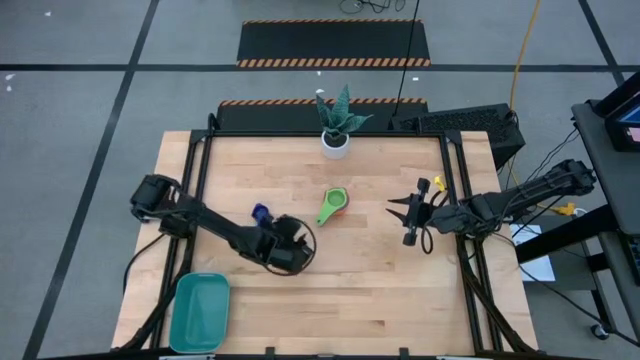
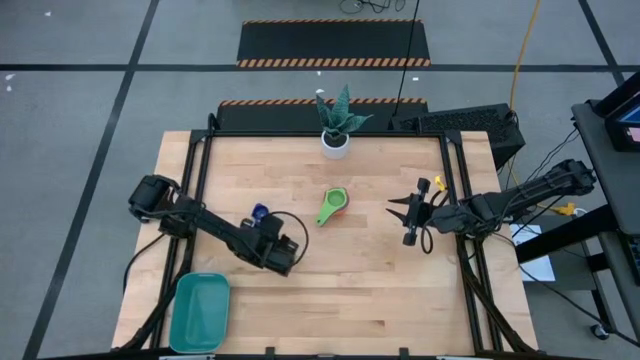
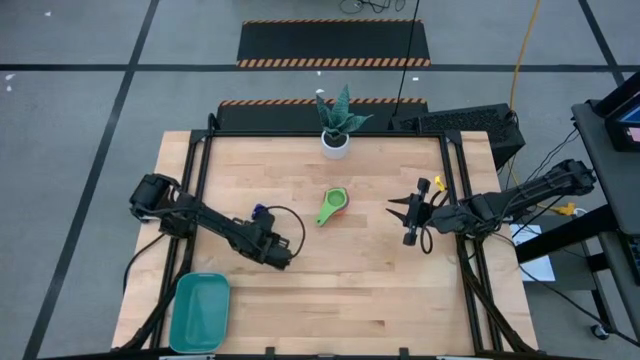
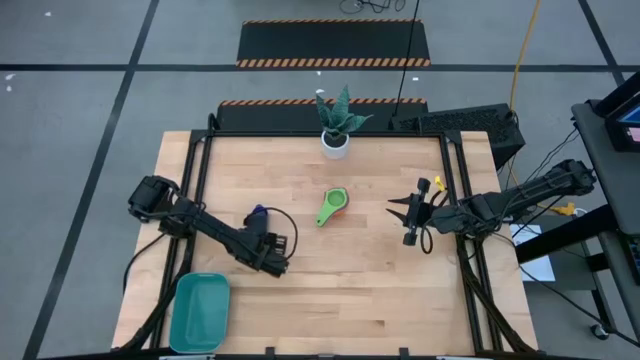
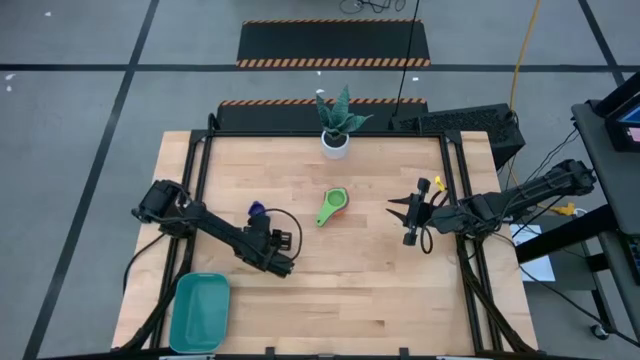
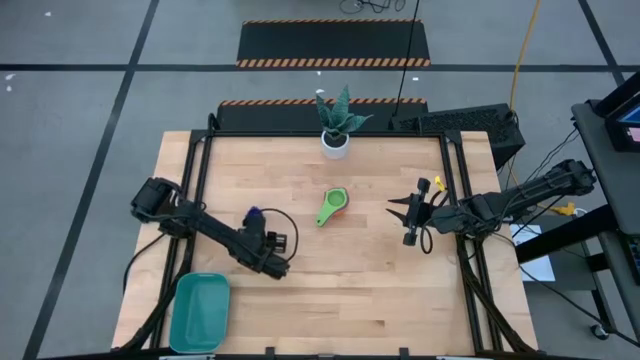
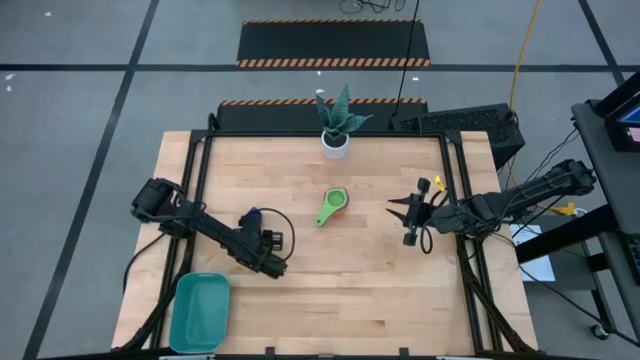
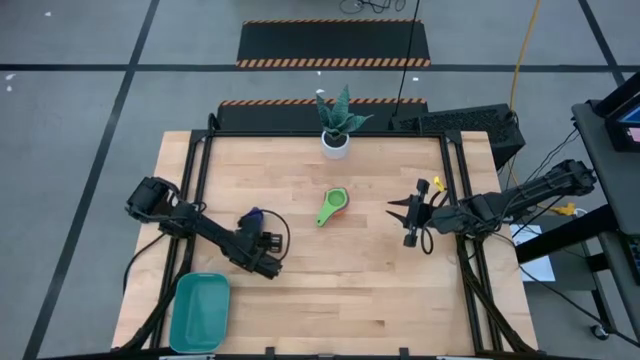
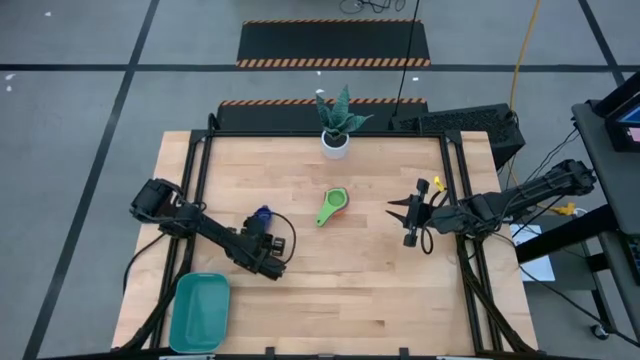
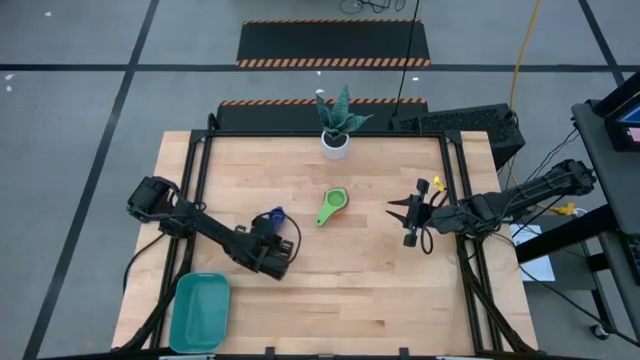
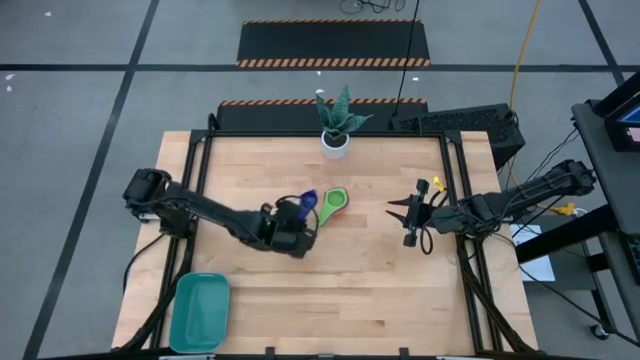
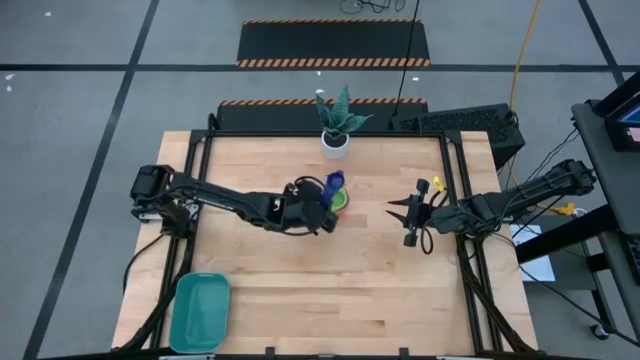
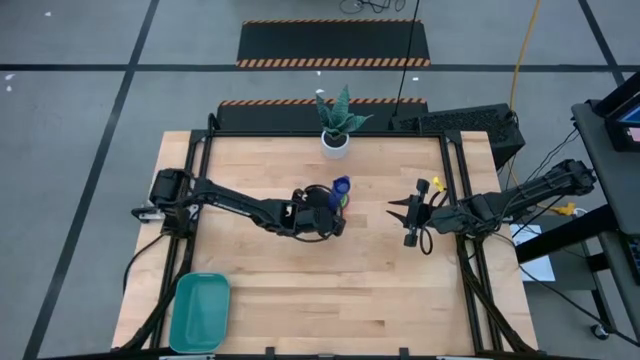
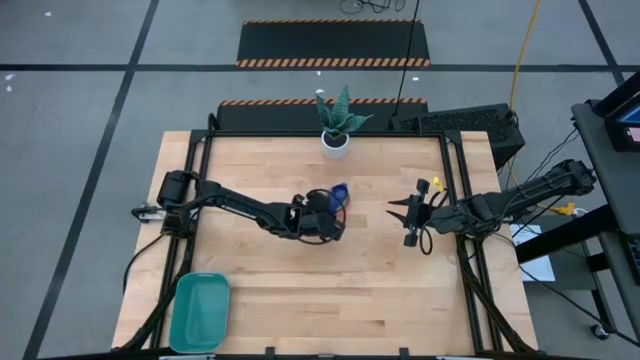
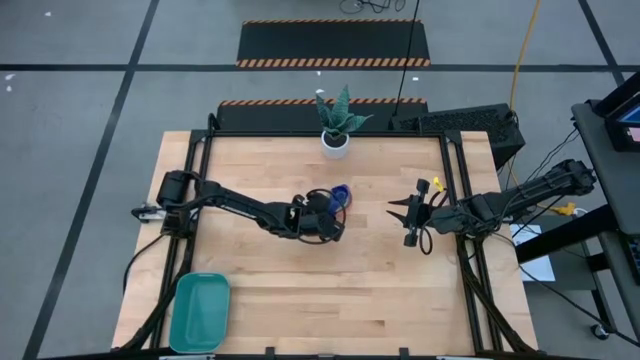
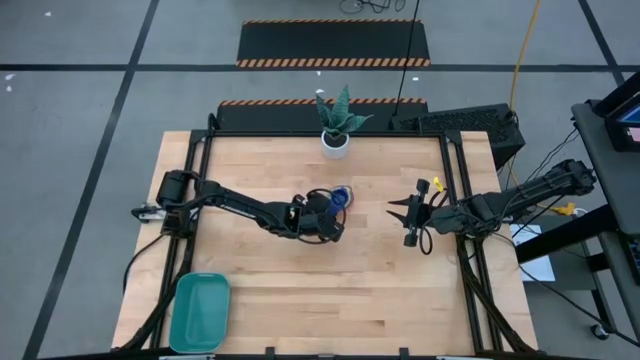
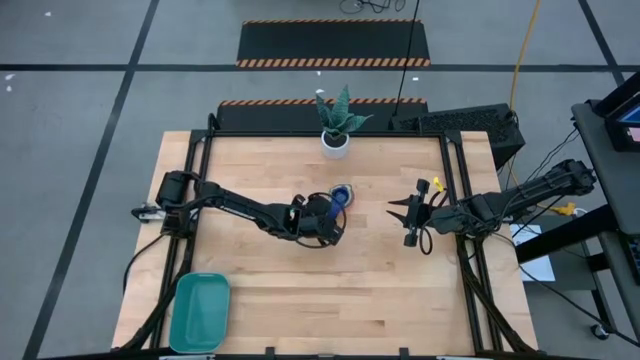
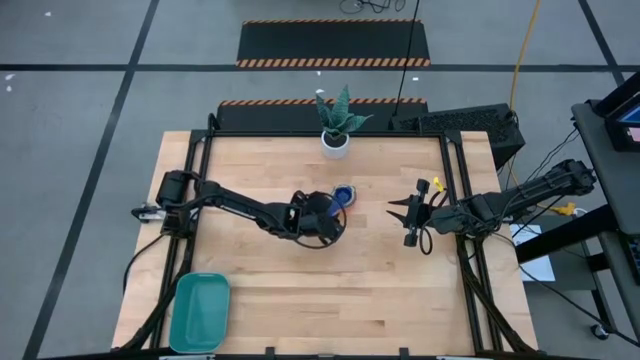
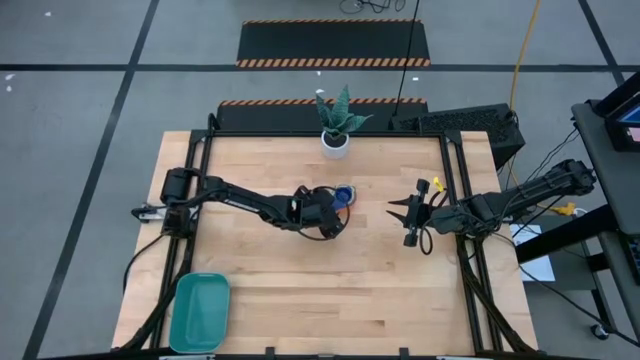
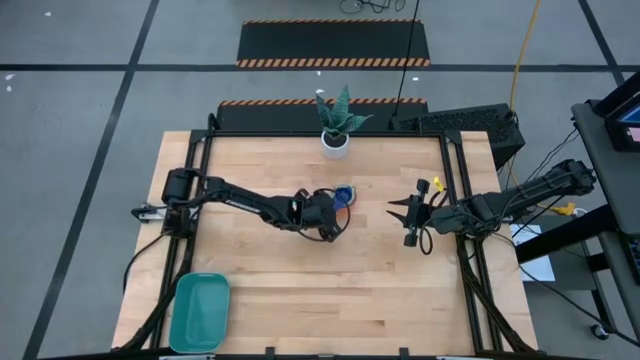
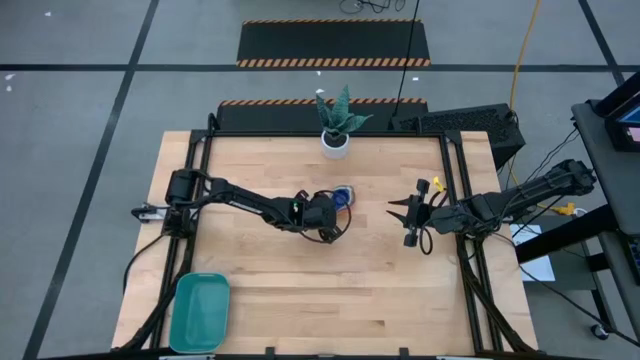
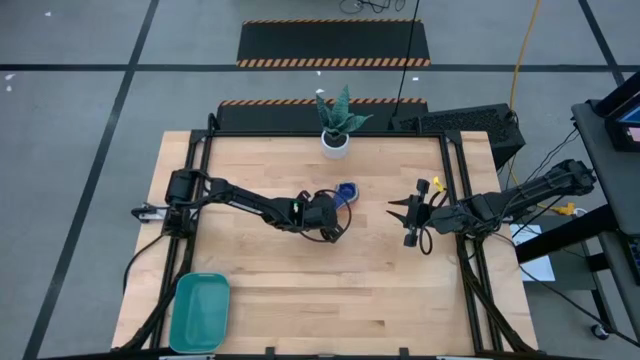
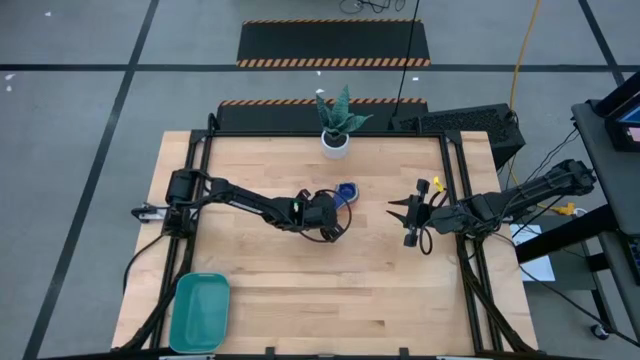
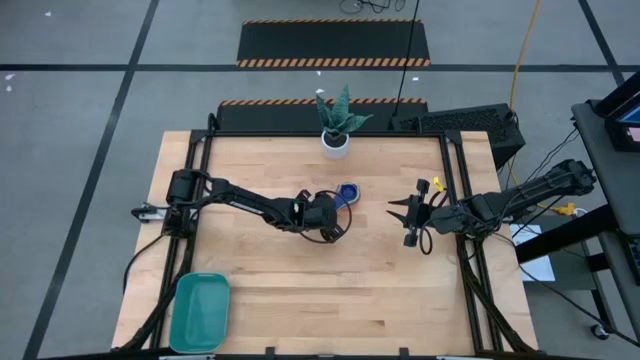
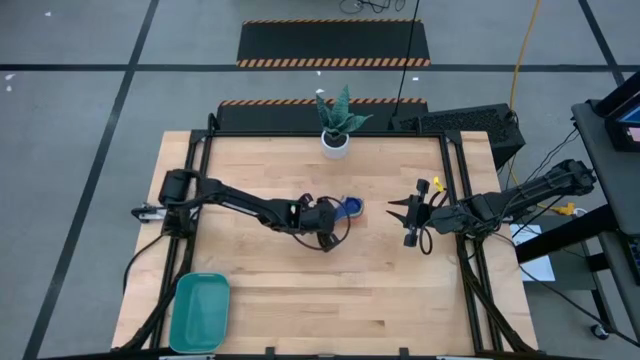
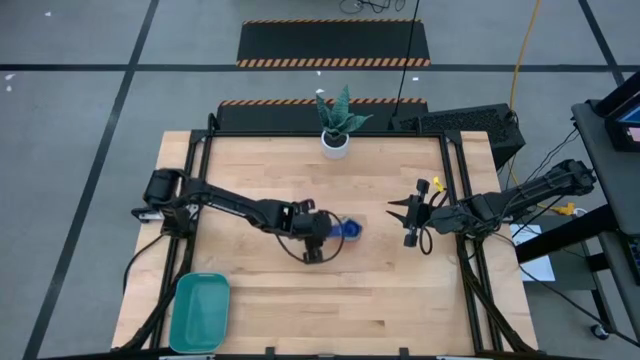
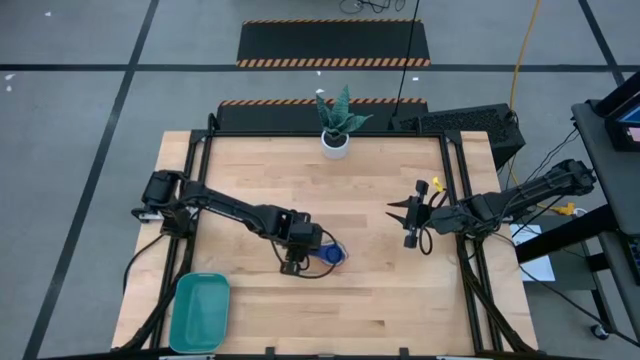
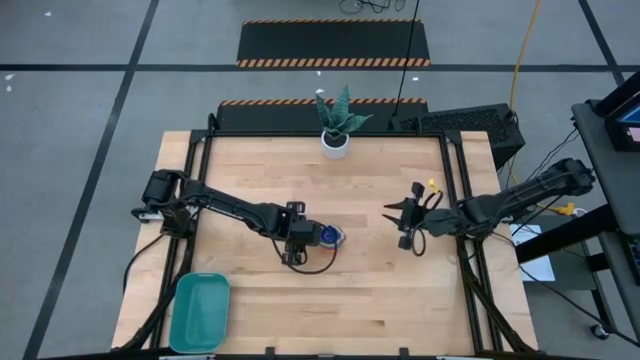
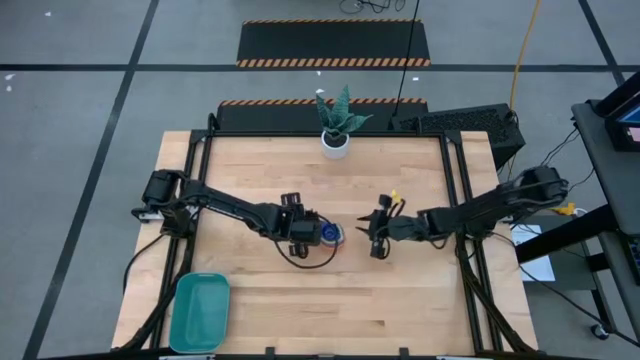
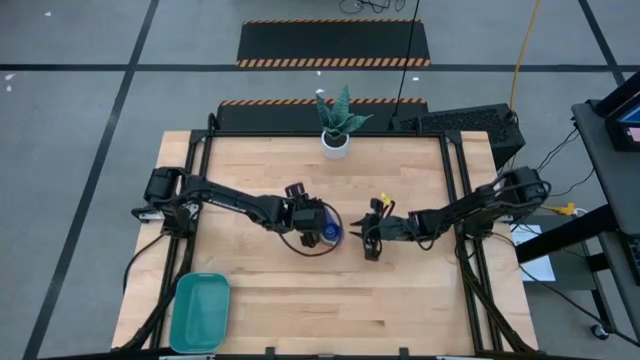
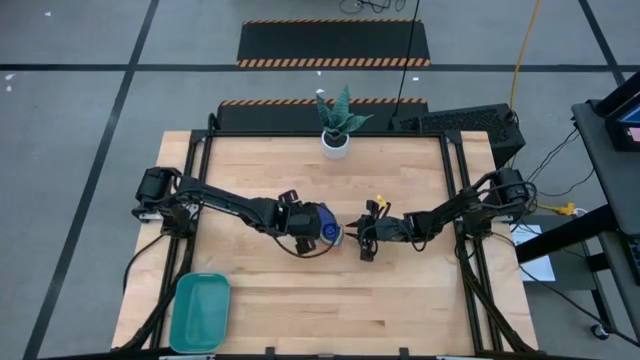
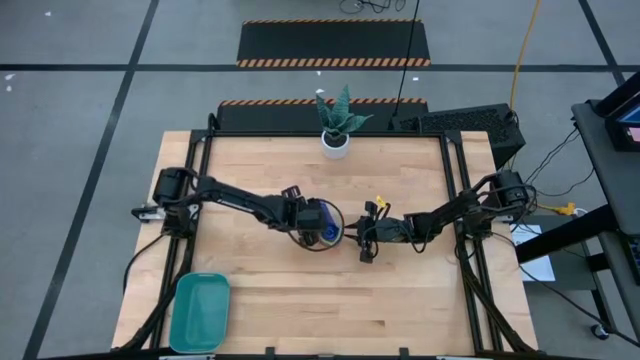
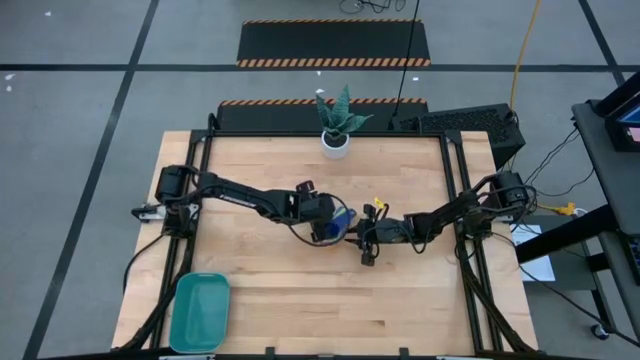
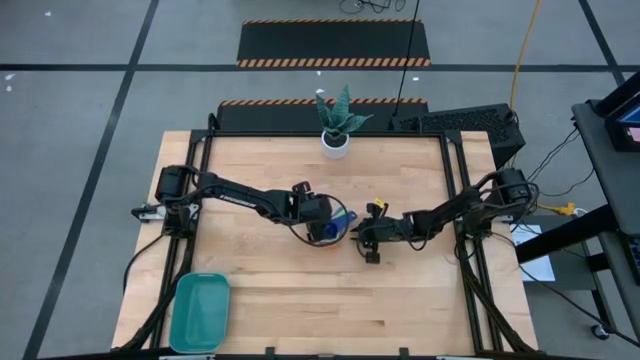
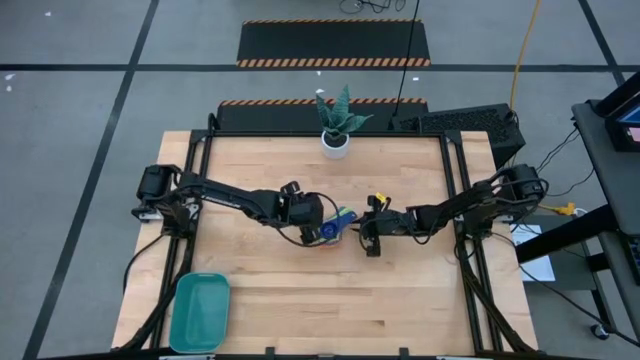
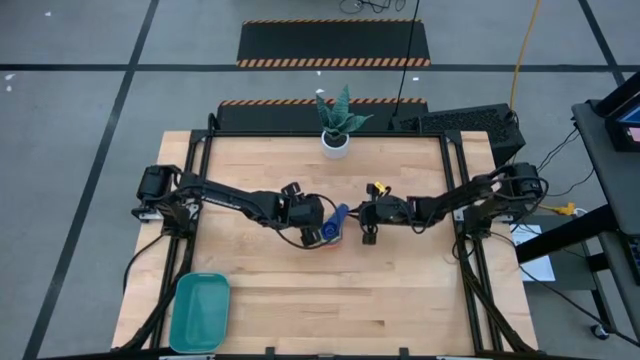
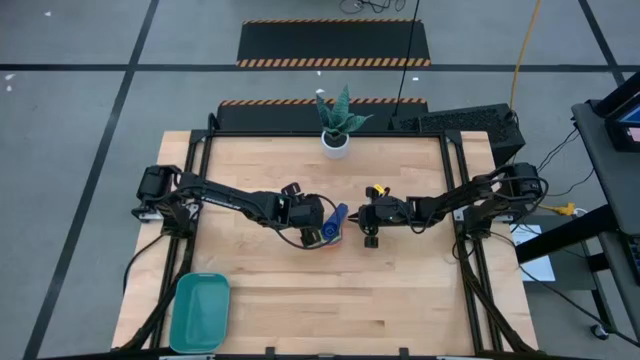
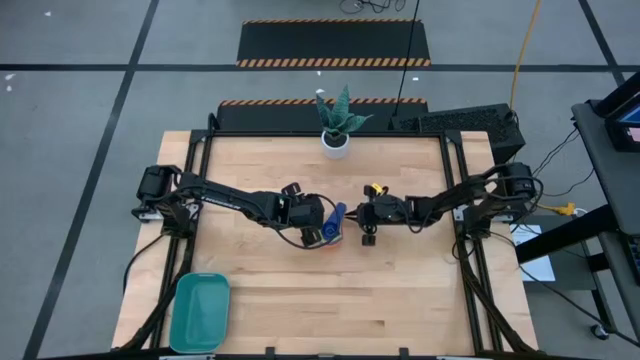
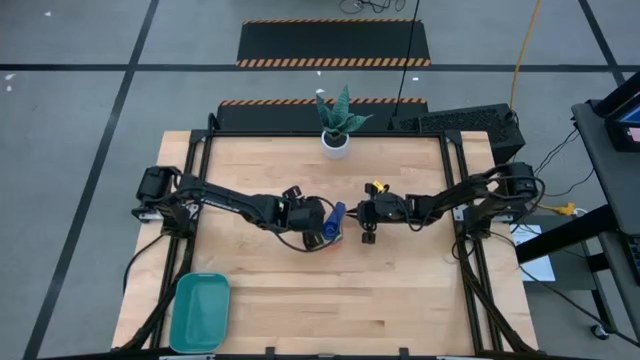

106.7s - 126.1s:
Task: Nest measuring cups in basket
Stack the violet measuring cup on the green measuring cup

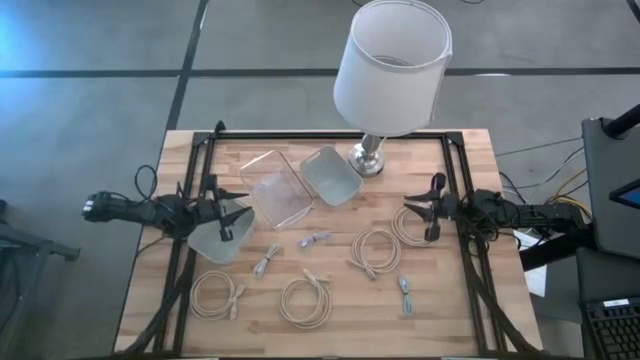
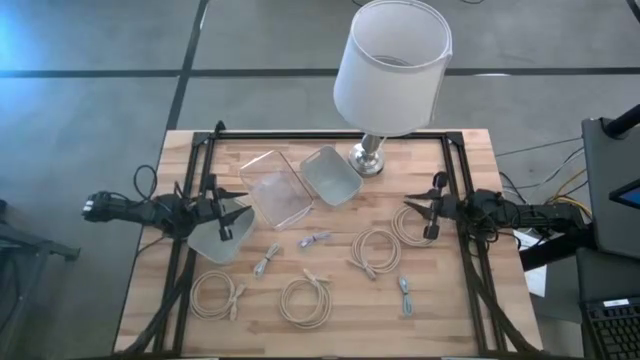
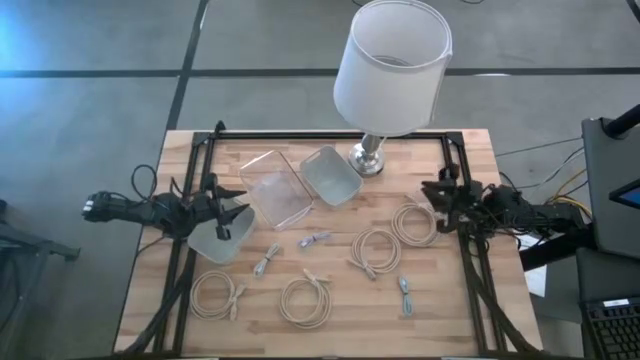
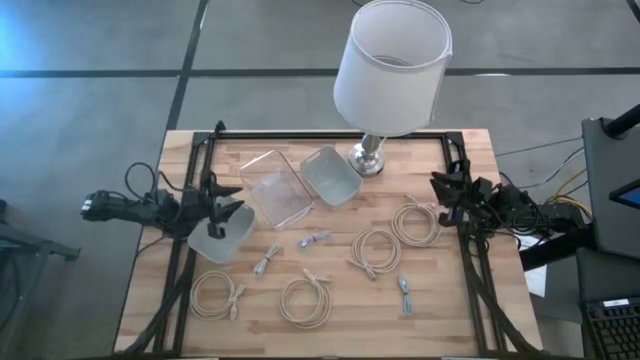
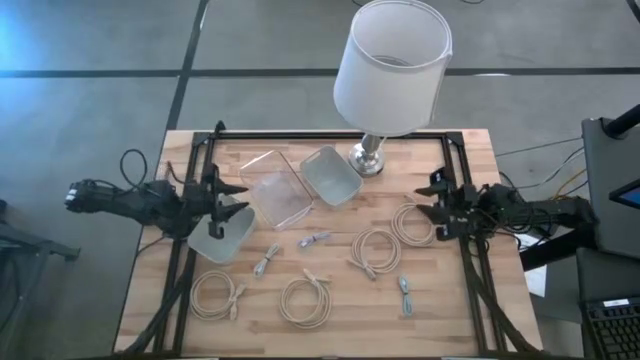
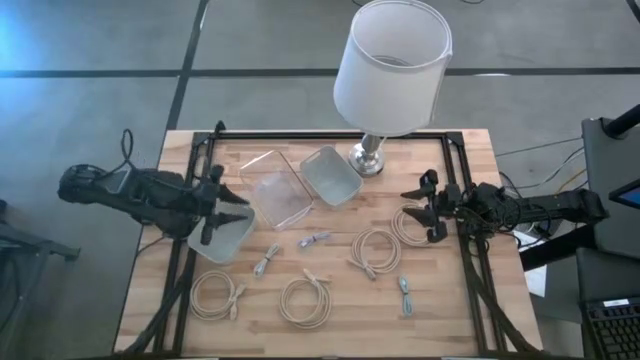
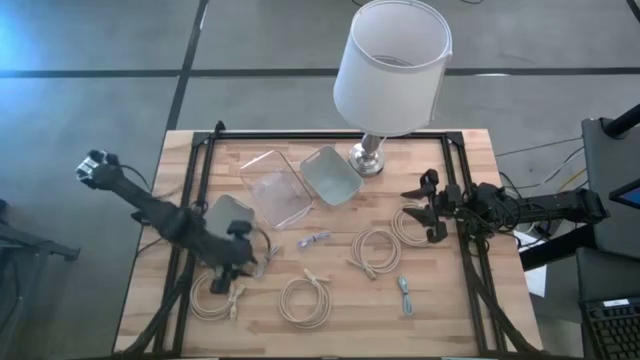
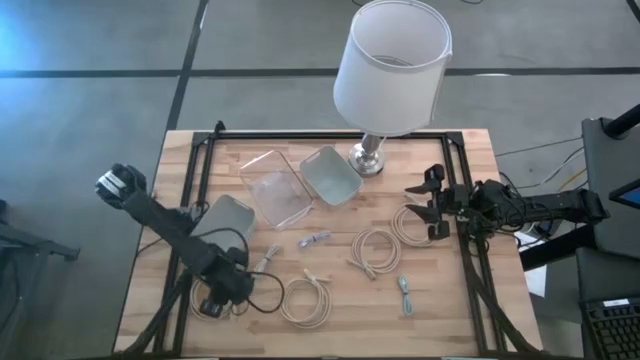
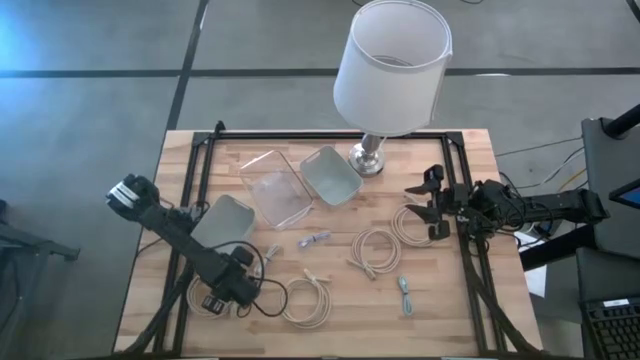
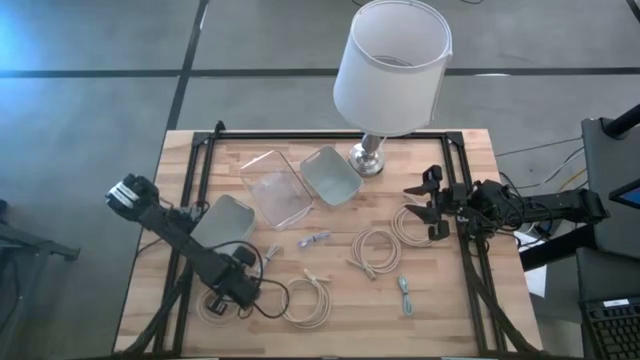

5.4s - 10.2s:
Task: Pick & Place USB Port
Put the brown hdmi cable into the left gray bin
